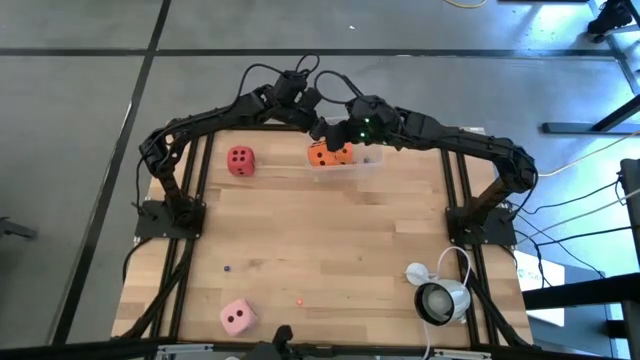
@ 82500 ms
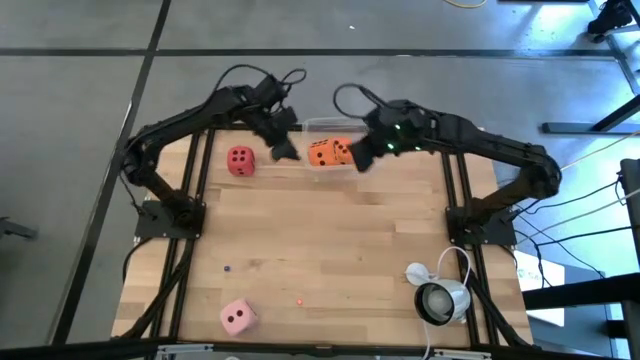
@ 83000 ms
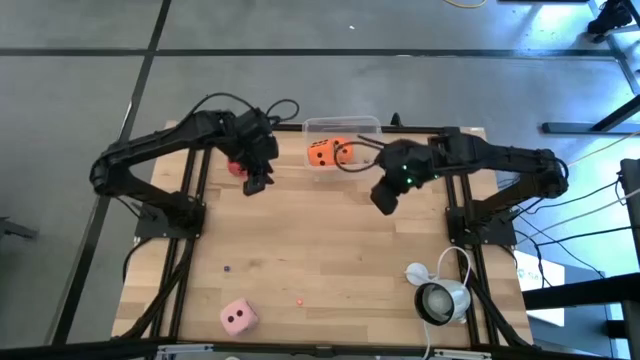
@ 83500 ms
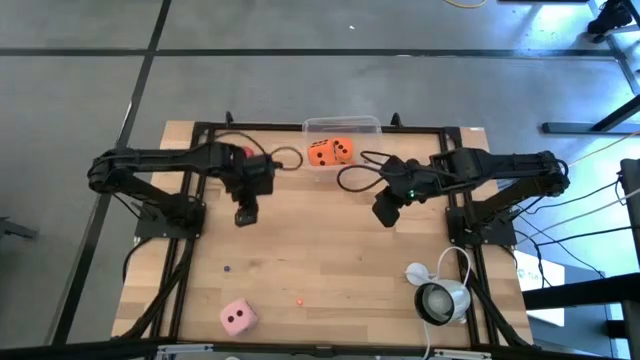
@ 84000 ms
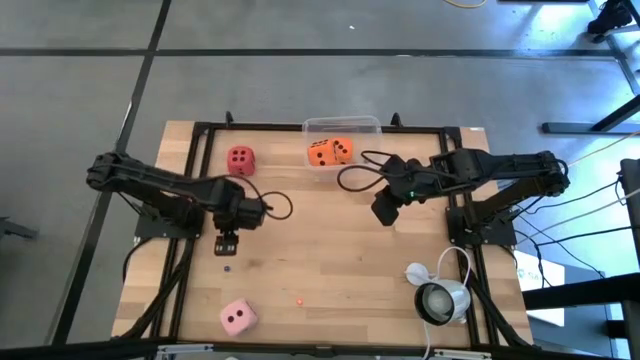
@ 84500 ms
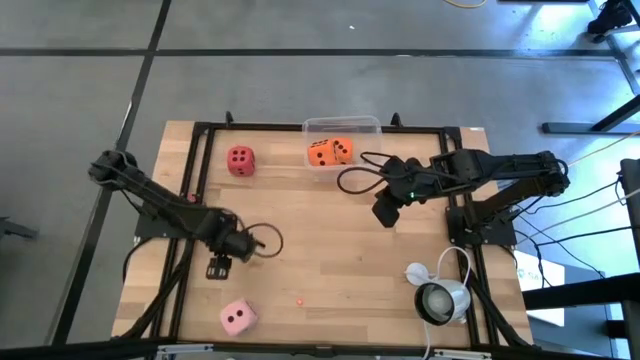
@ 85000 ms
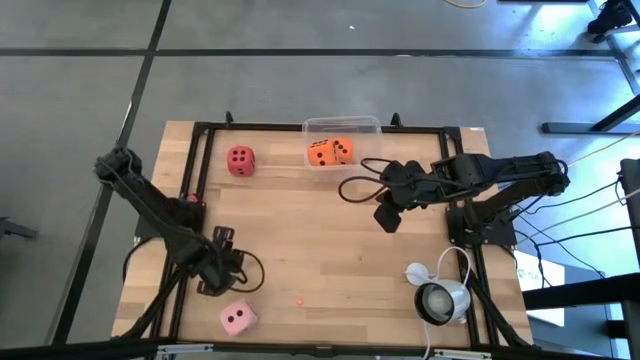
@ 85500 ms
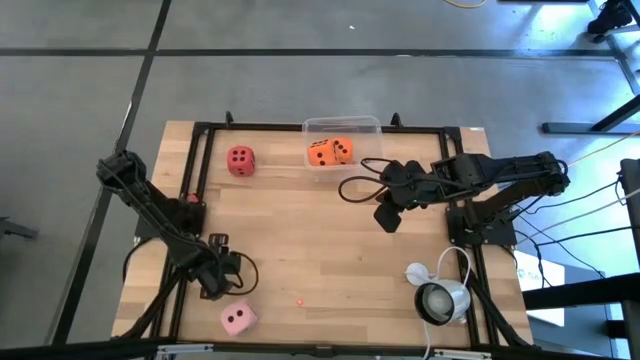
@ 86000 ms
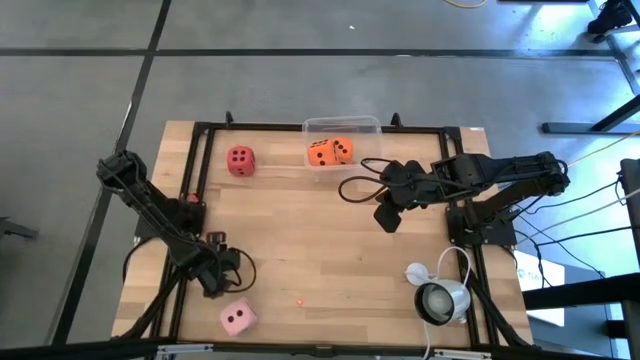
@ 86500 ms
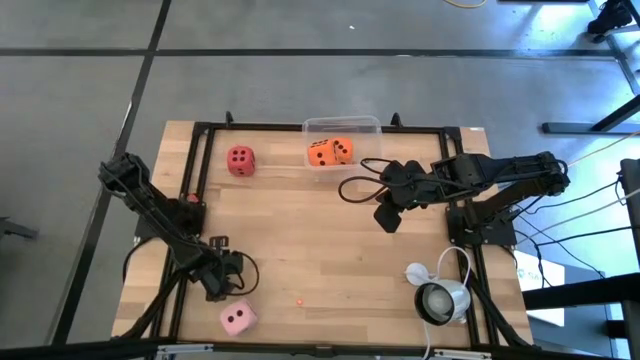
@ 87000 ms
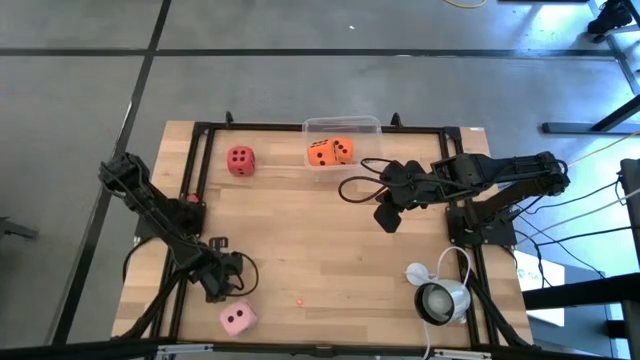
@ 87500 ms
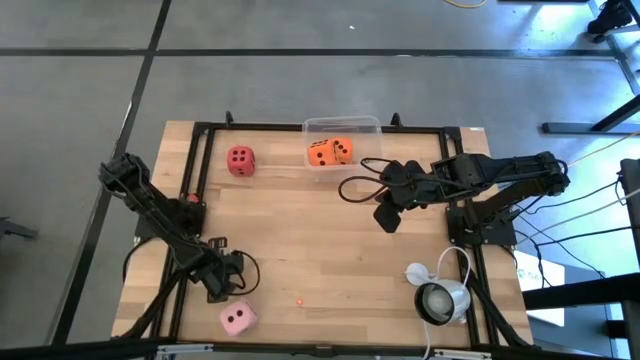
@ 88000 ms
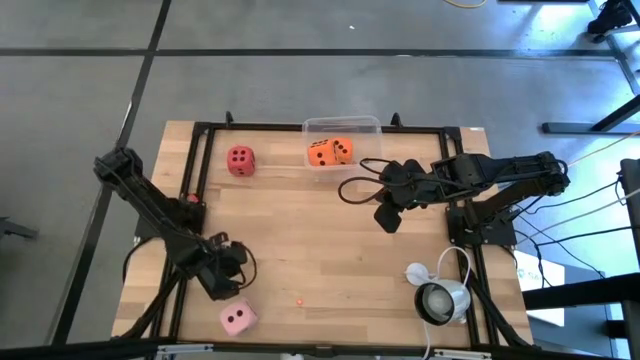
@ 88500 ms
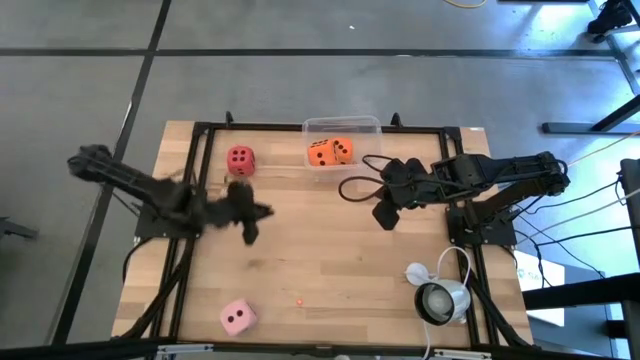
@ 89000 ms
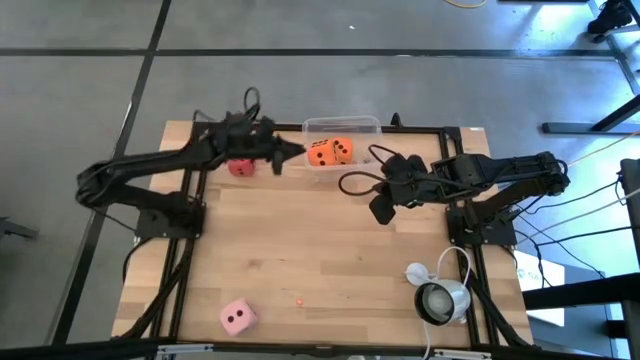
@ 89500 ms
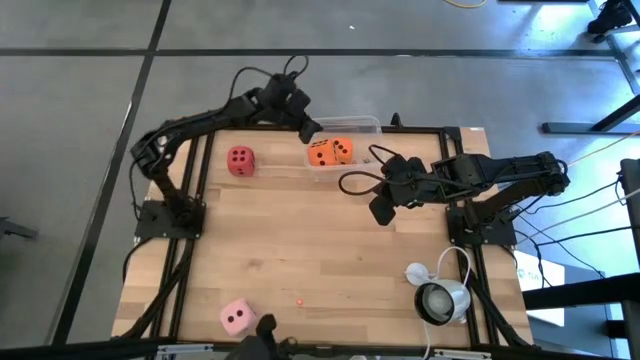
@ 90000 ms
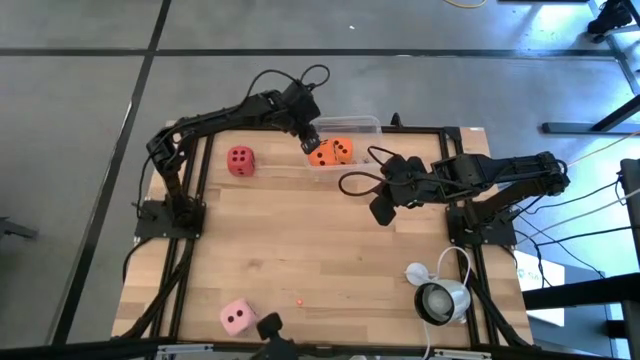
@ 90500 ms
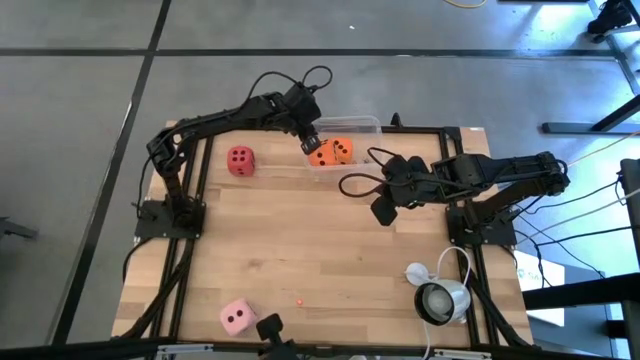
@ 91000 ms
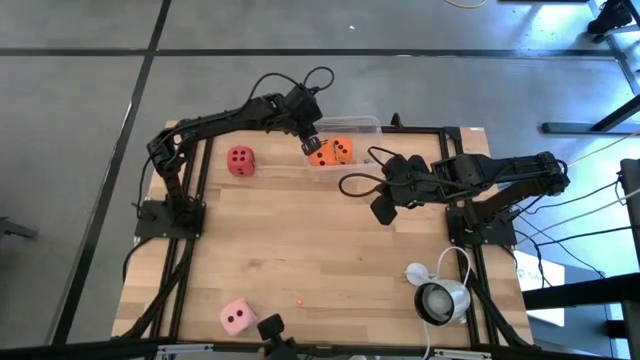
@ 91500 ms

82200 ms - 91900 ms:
Task: Pick & Place Dice
Put the small blue dice into the transparent bin

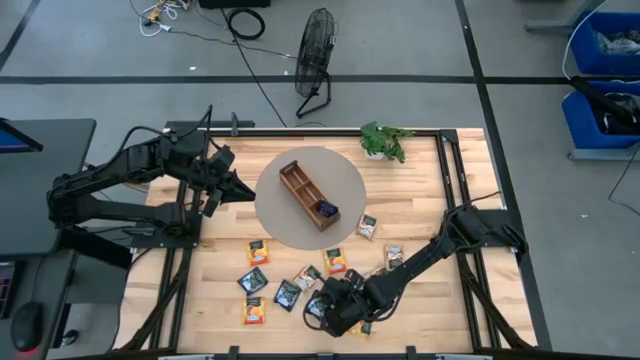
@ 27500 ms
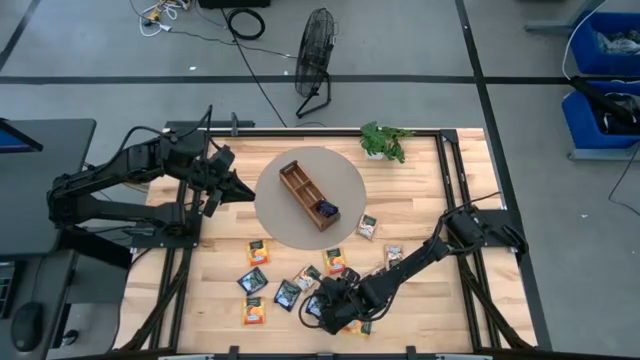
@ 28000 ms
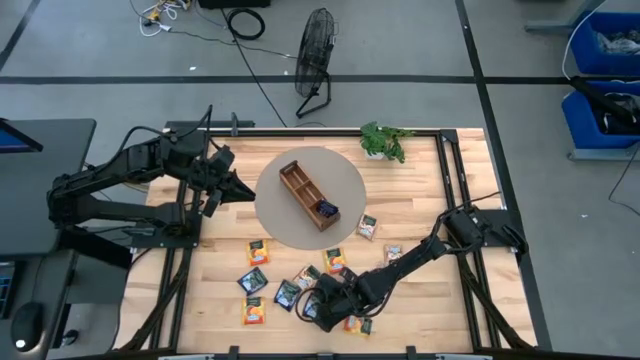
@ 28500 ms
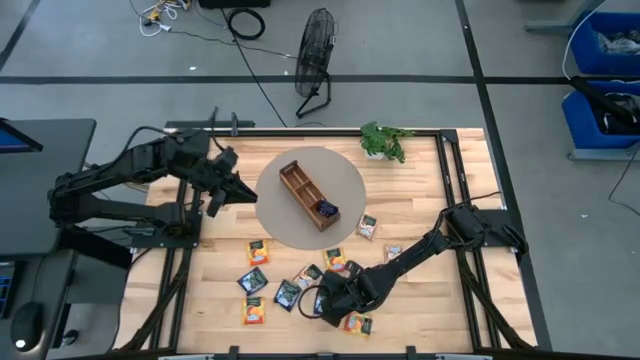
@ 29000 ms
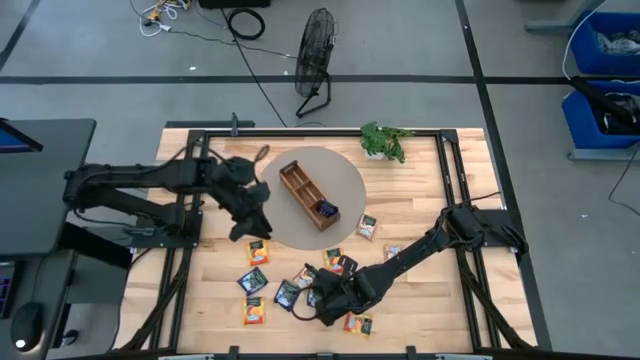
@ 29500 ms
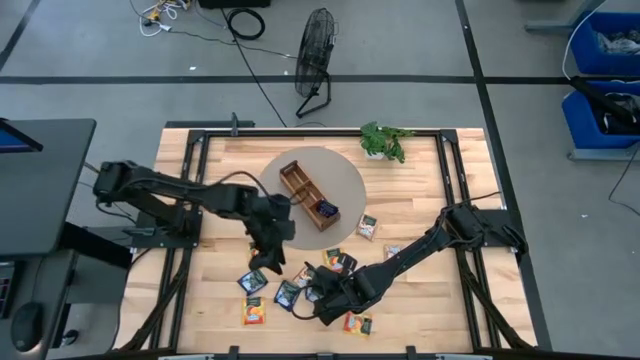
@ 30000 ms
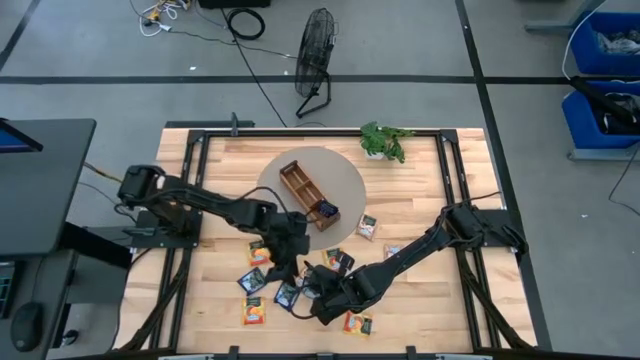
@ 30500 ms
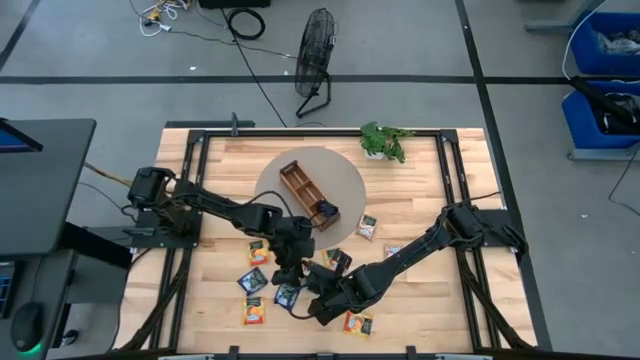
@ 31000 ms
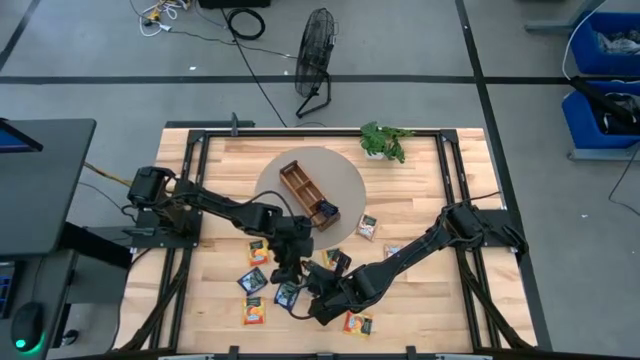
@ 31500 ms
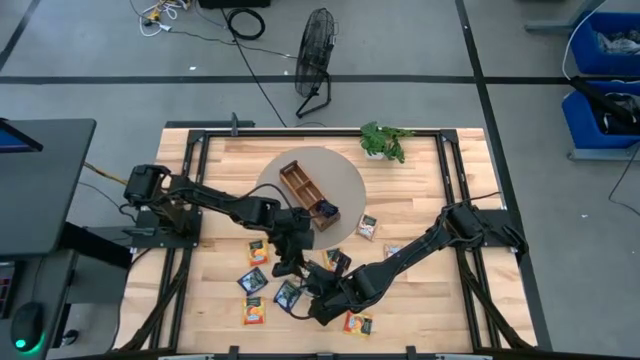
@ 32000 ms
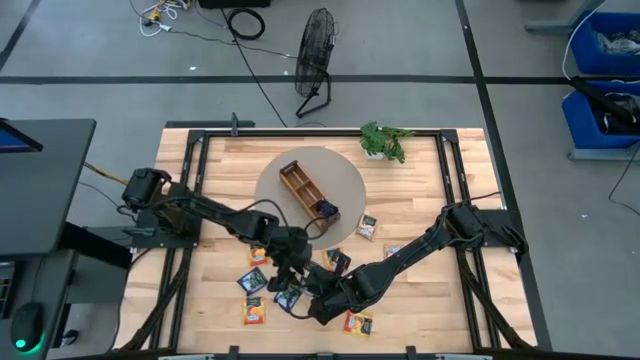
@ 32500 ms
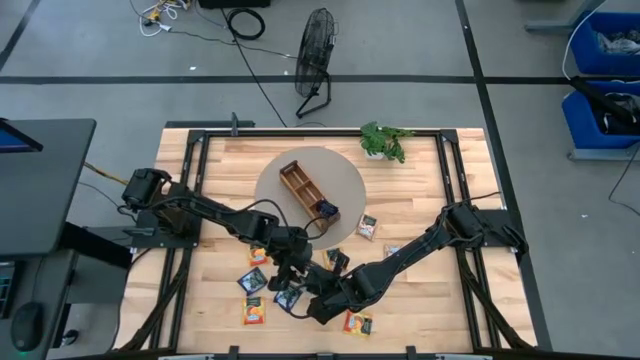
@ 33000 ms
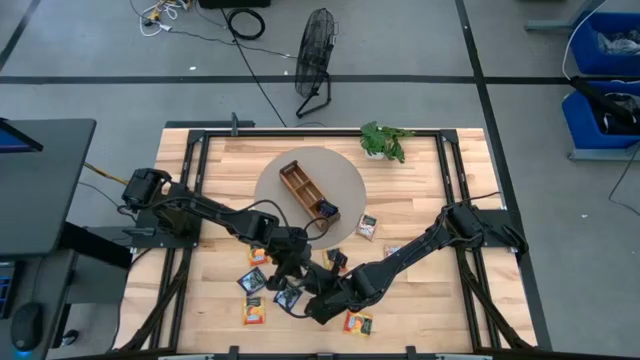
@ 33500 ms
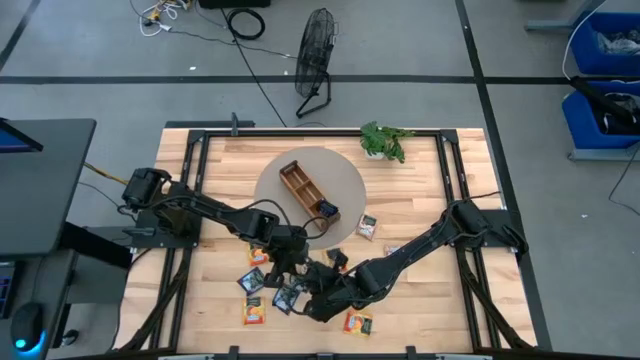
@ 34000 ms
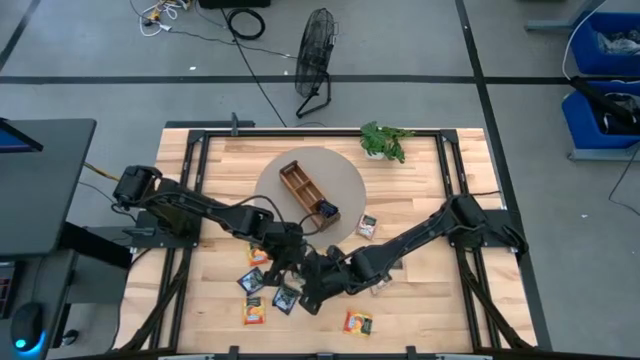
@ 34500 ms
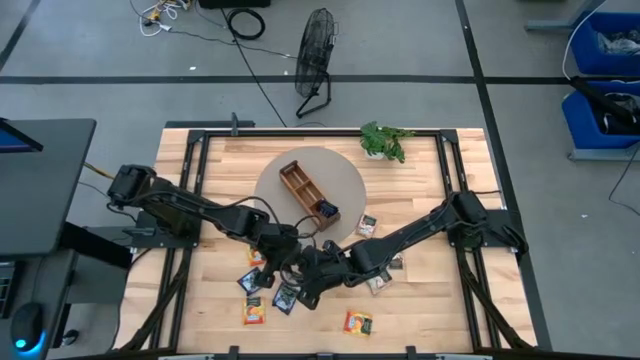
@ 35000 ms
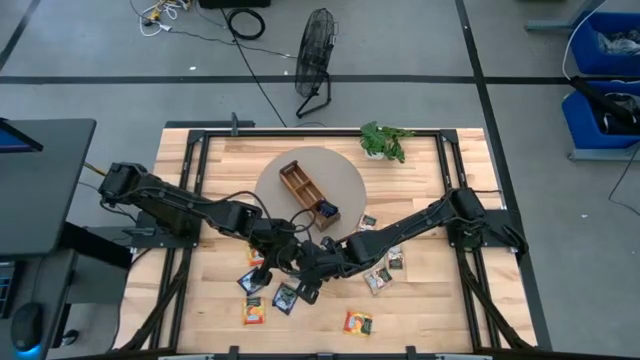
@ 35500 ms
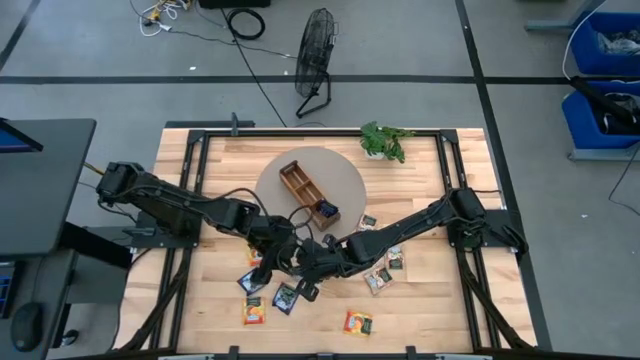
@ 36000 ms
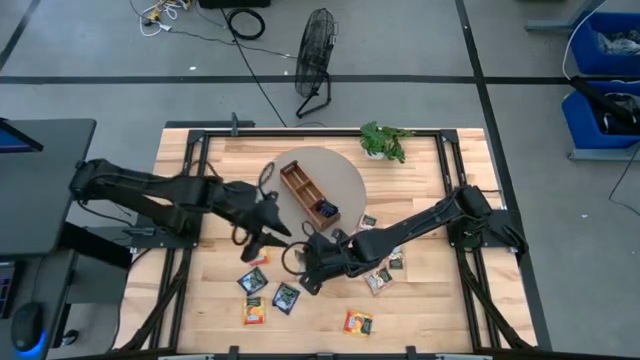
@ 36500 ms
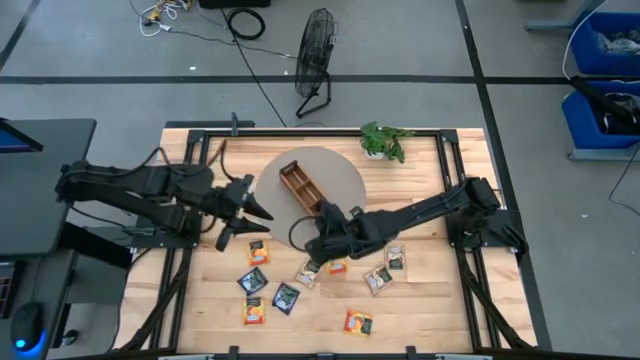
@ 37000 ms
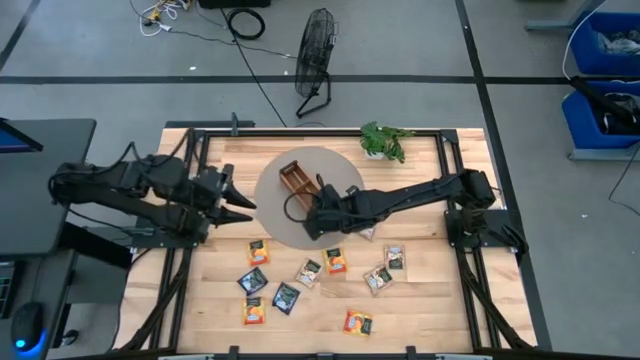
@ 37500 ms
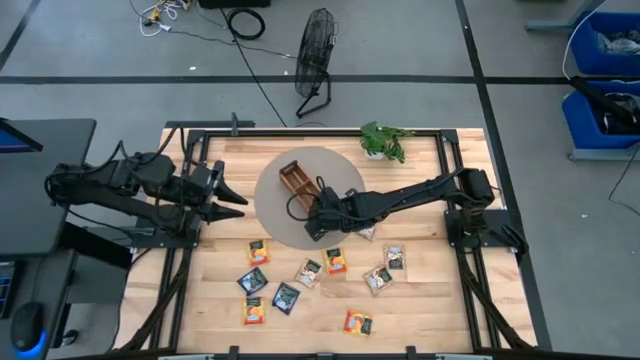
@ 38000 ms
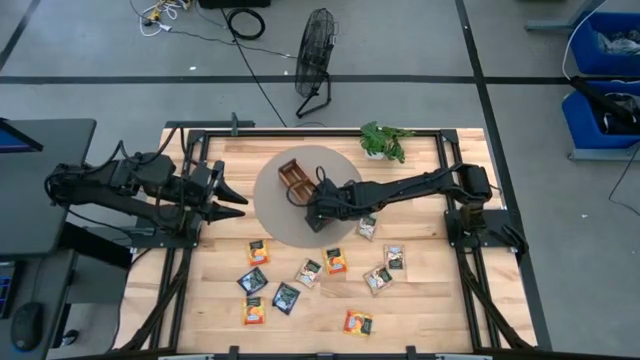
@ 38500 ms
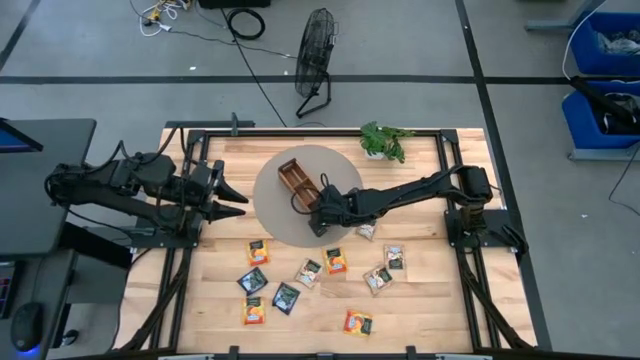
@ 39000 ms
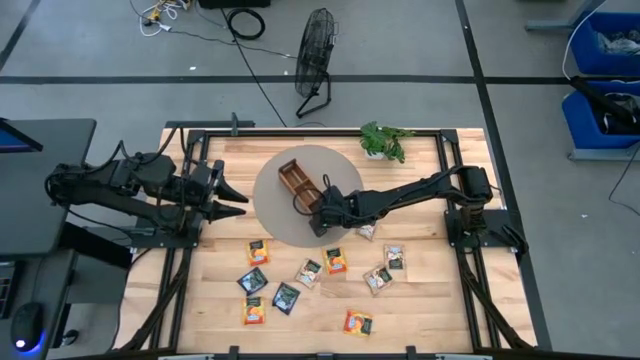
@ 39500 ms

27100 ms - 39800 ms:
Task: Pick & Place Tea
Put the purple tea bag into the right section of the wooden organizer
